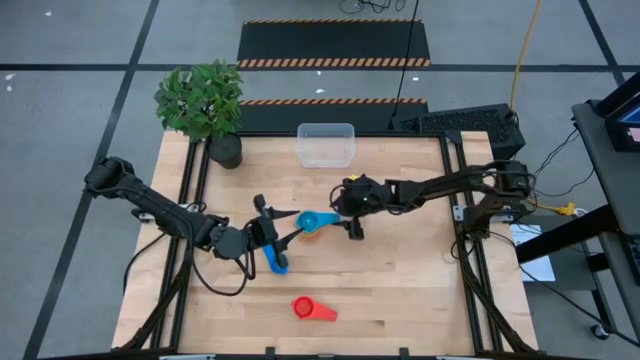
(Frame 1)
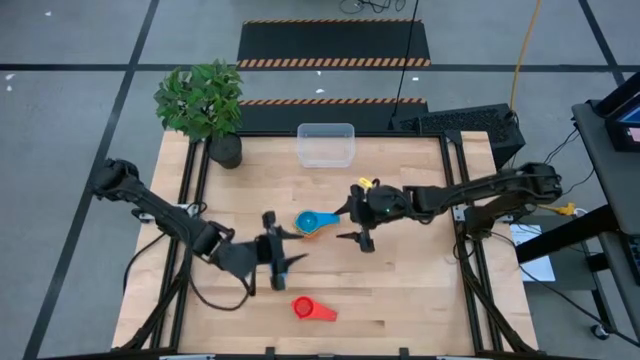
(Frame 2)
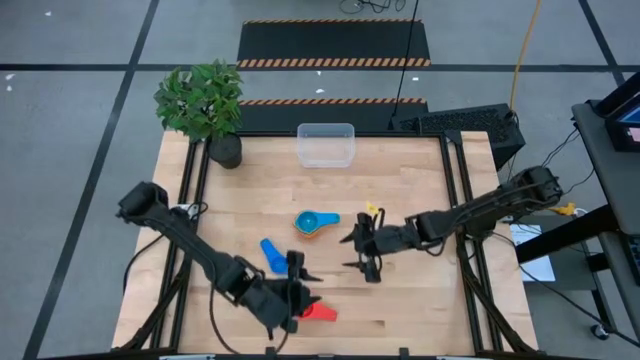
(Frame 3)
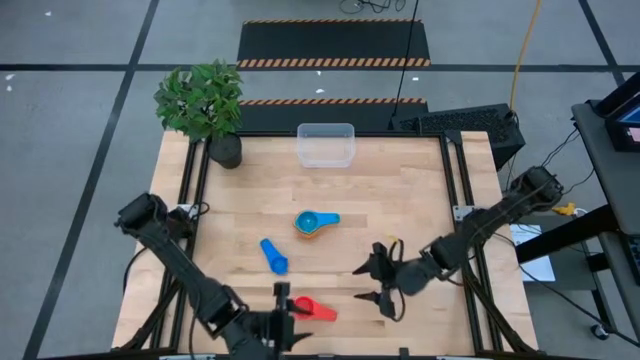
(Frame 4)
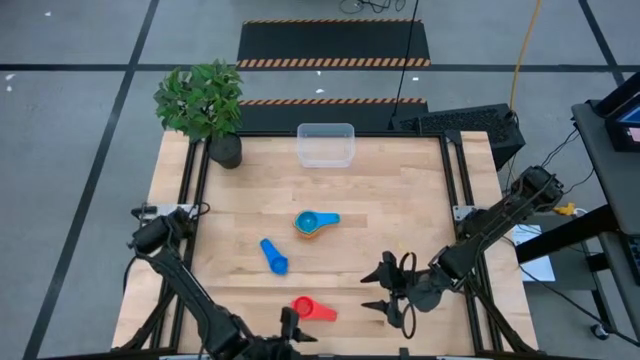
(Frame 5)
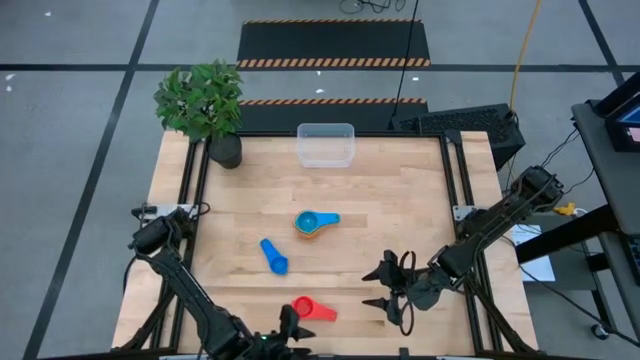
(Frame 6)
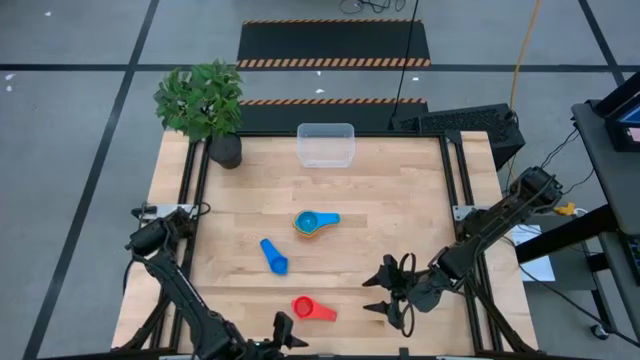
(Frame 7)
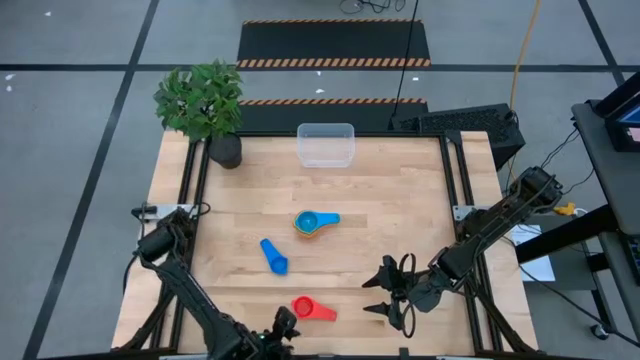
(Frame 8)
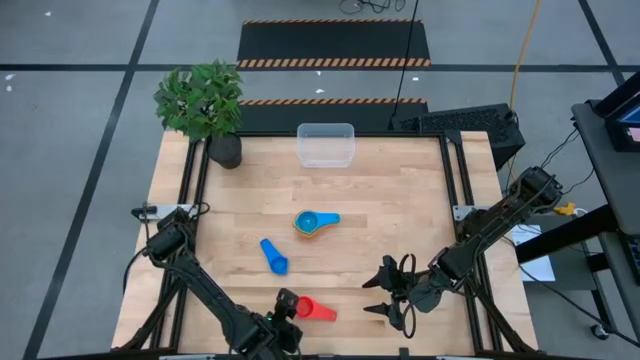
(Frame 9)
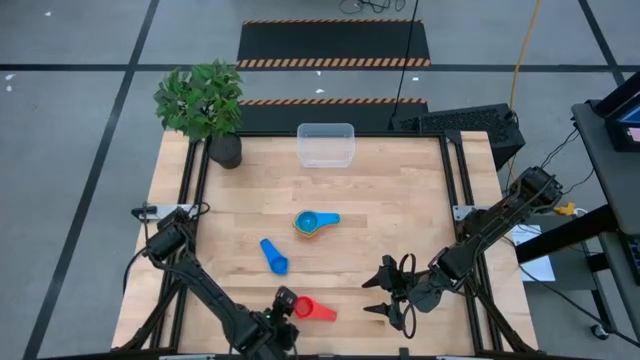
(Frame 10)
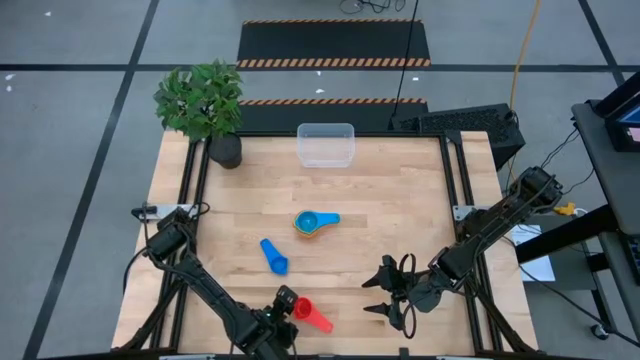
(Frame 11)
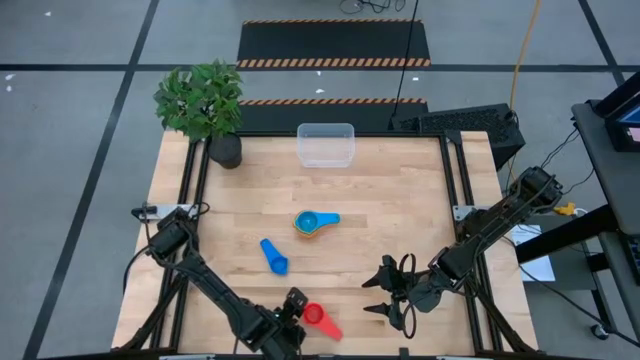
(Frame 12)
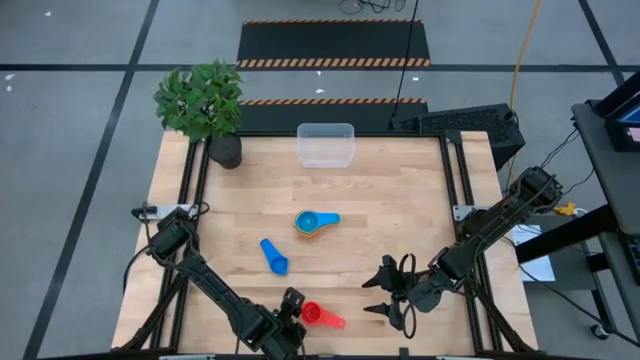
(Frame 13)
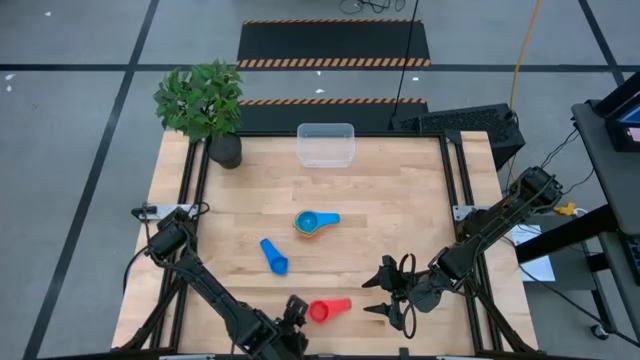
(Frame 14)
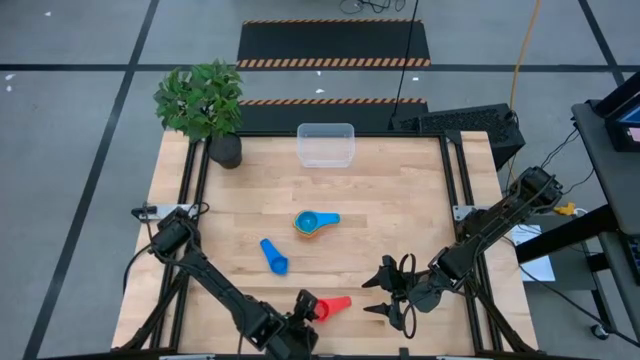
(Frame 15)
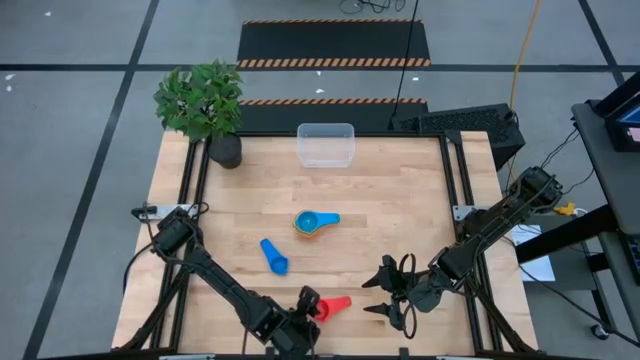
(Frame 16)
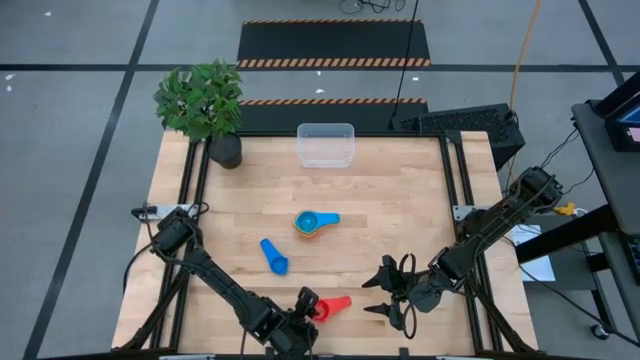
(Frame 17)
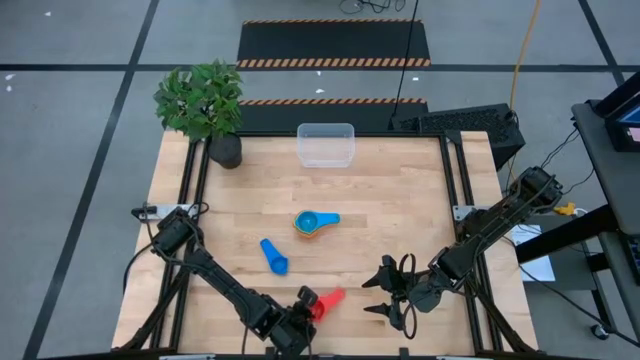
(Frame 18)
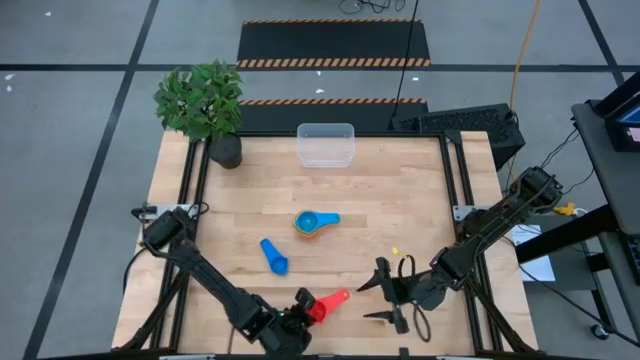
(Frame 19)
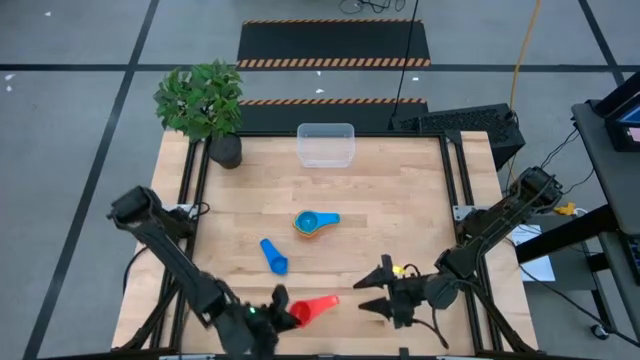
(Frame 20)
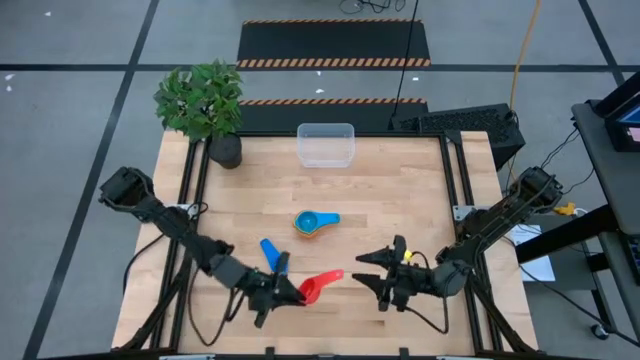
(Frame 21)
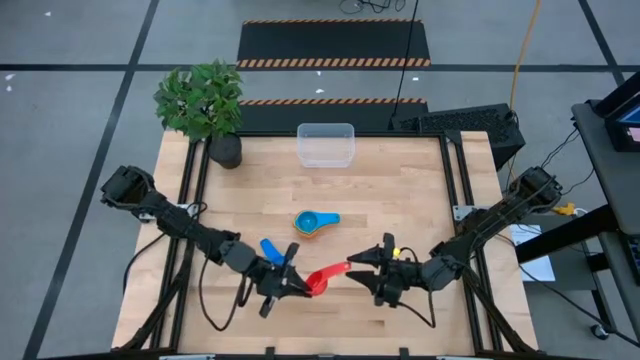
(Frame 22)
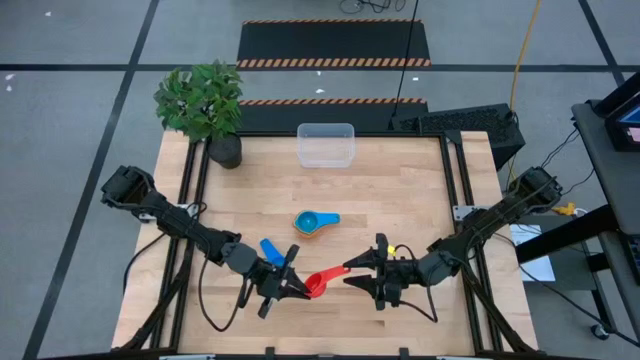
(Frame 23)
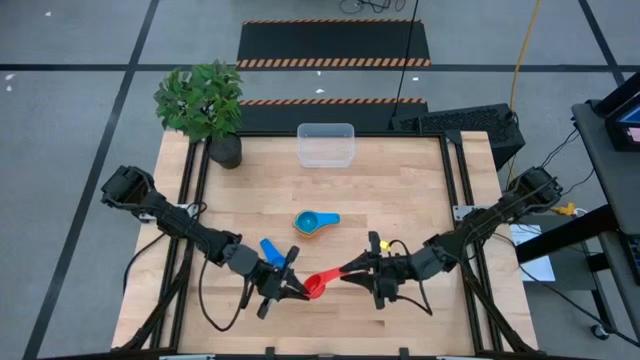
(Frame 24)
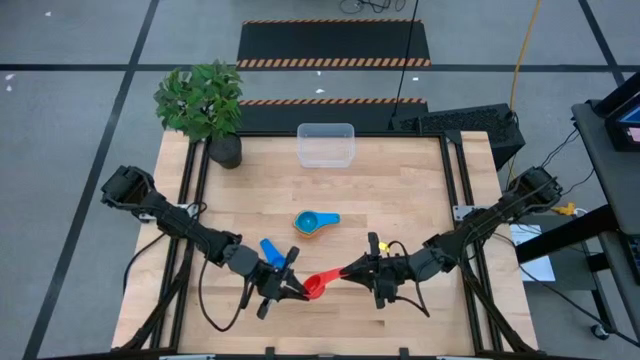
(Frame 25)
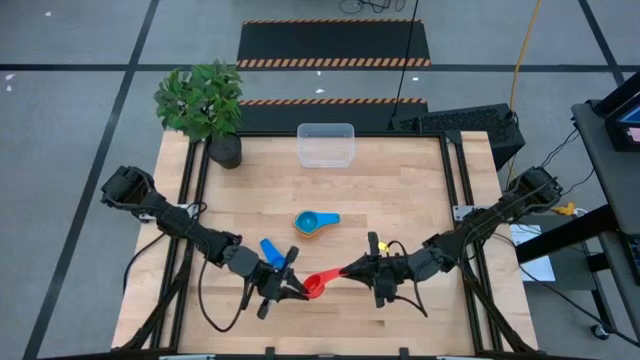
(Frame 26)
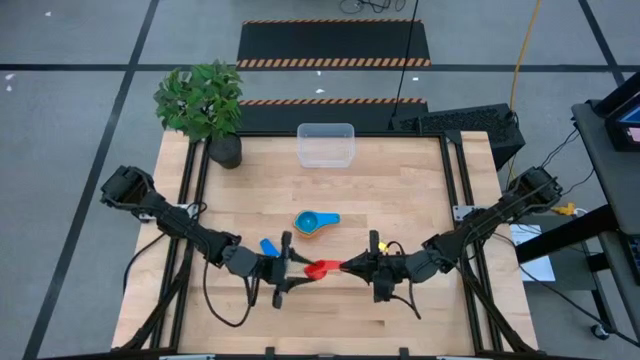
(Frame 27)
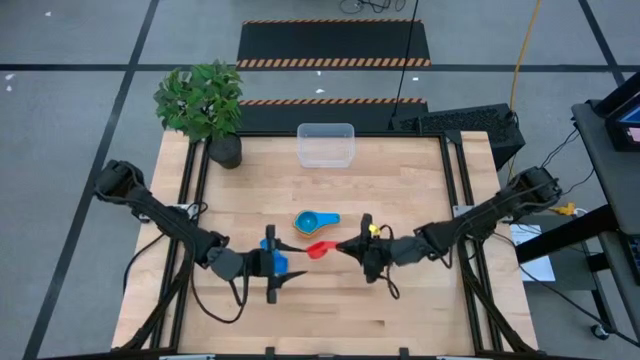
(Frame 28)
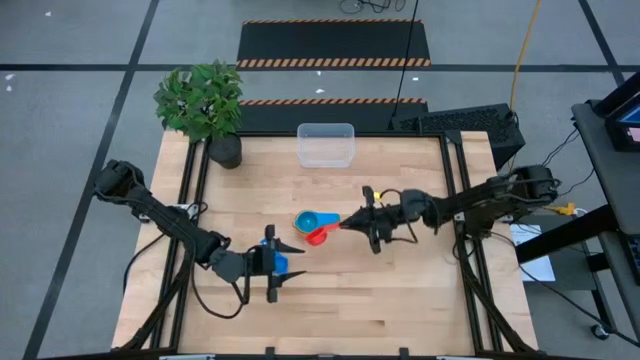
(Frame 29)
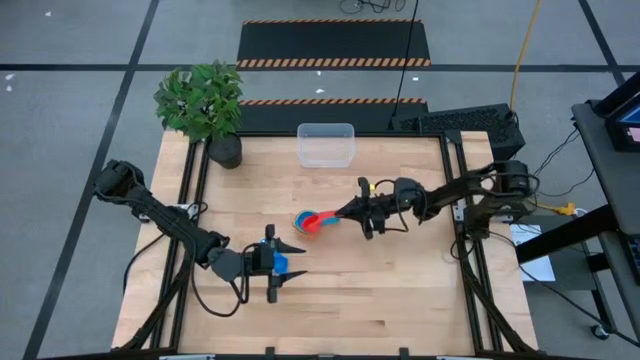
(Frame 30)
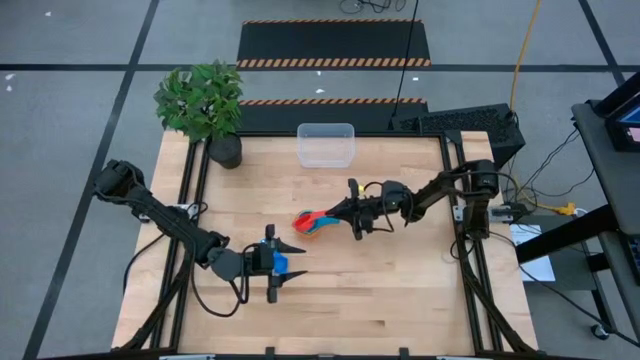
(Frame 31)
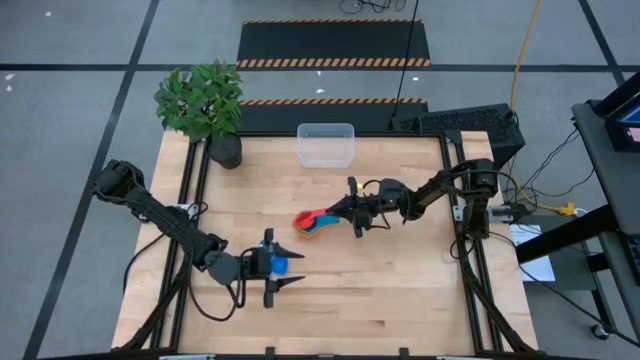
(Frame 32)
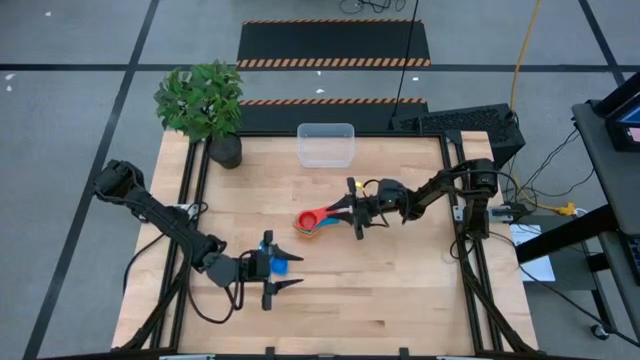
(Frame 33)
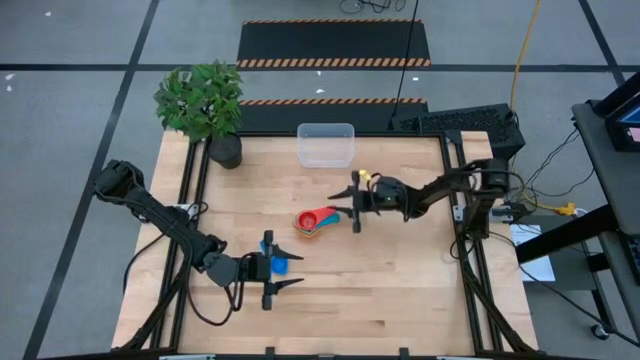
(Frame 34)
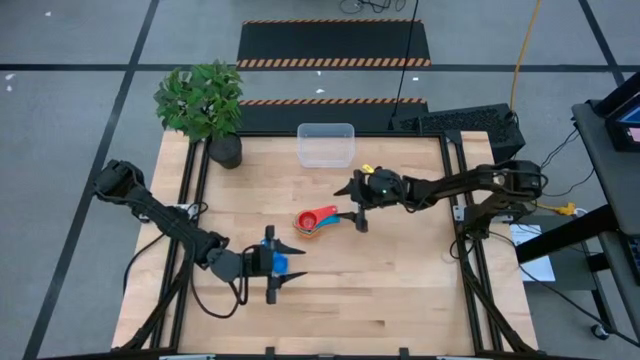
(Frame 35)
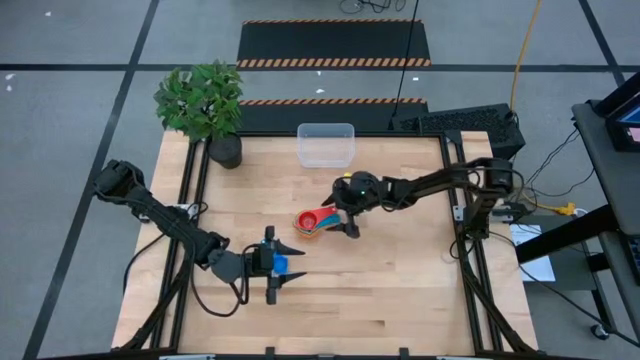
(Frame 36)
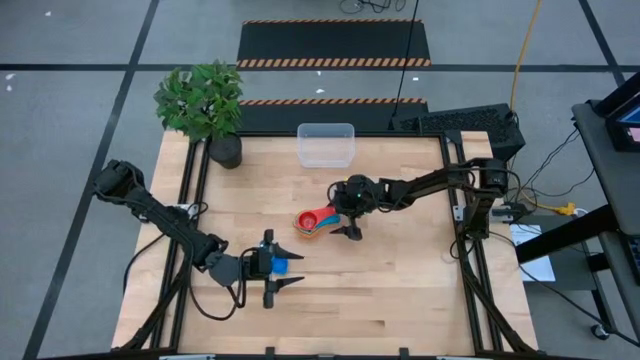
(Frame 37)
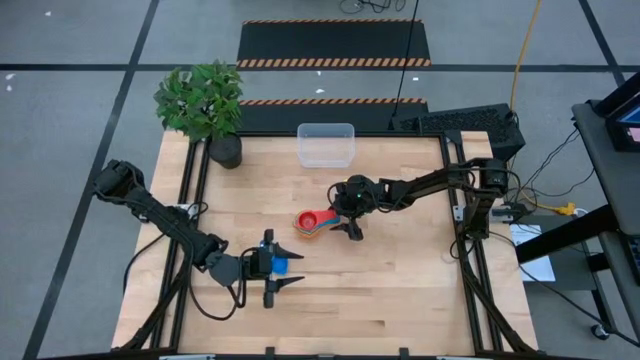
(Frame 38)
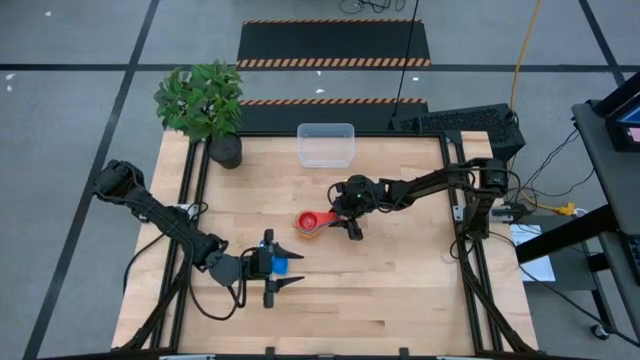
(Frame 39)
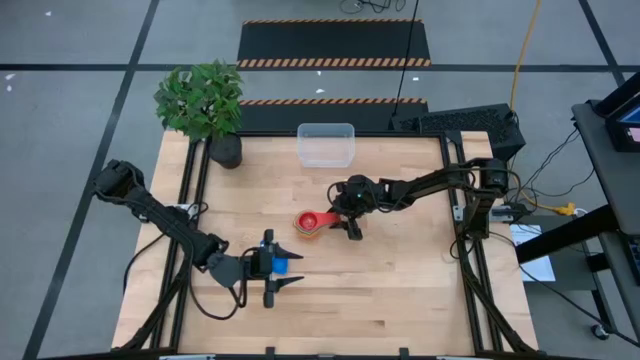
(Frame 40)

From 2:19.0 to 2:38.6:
Task: Nest measuring cups in basket
Stack the red measuring cup on top of the light blue measuring cup
